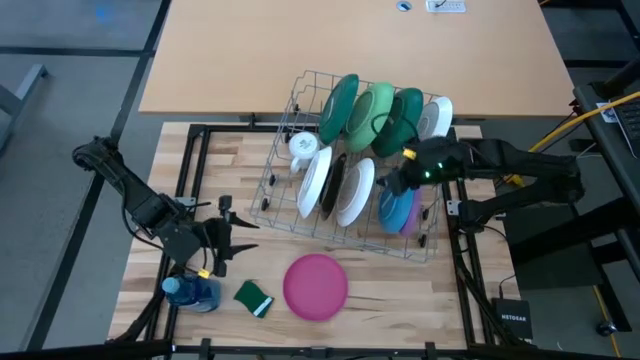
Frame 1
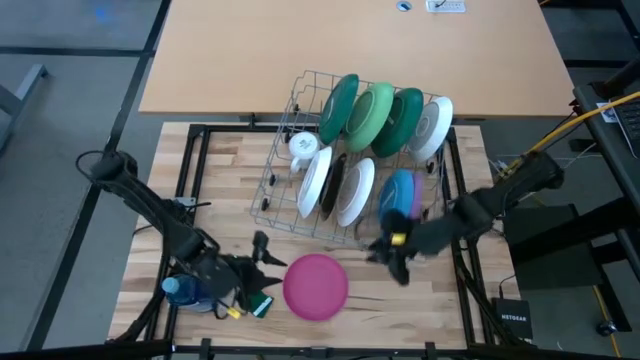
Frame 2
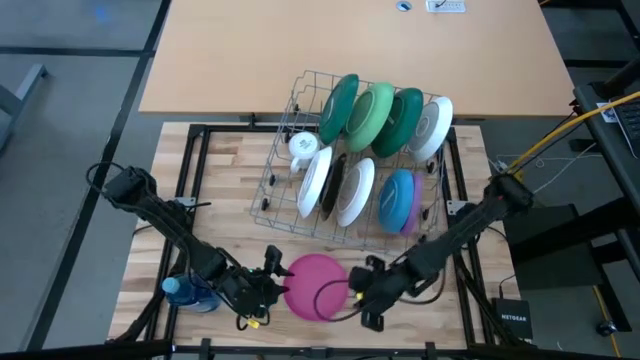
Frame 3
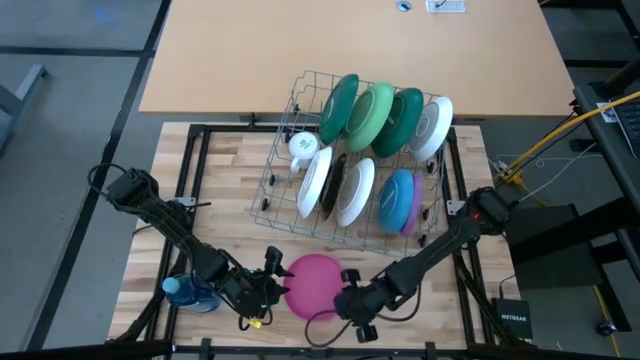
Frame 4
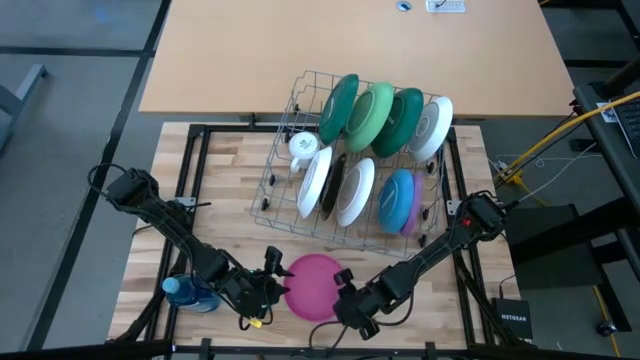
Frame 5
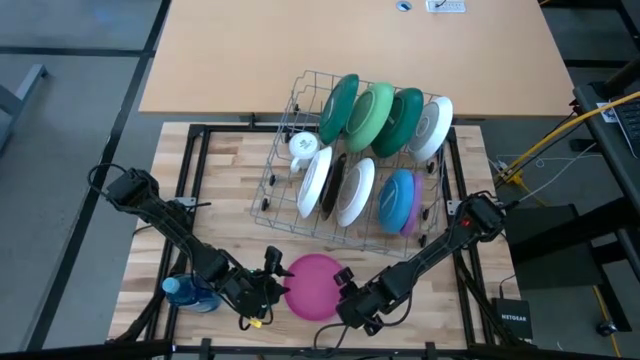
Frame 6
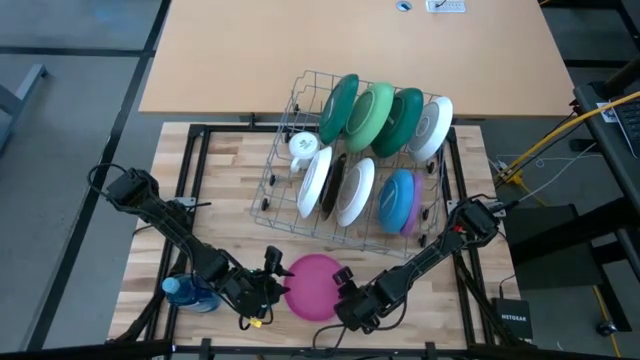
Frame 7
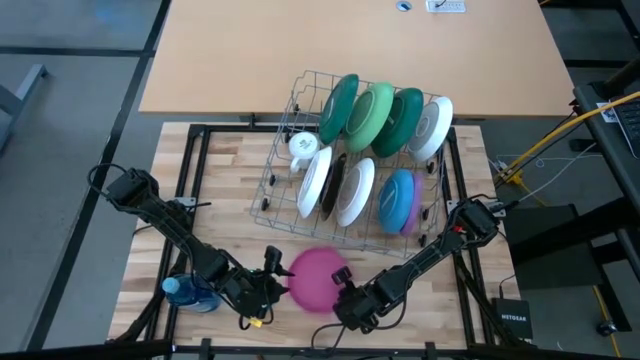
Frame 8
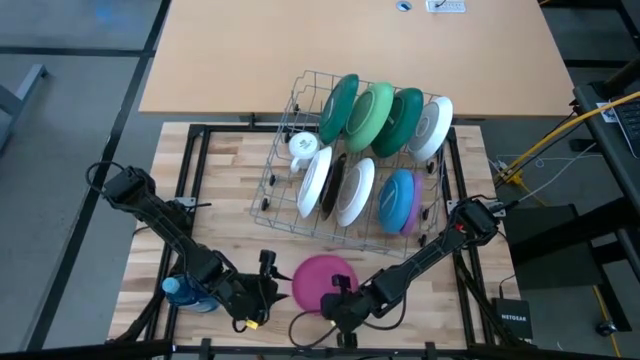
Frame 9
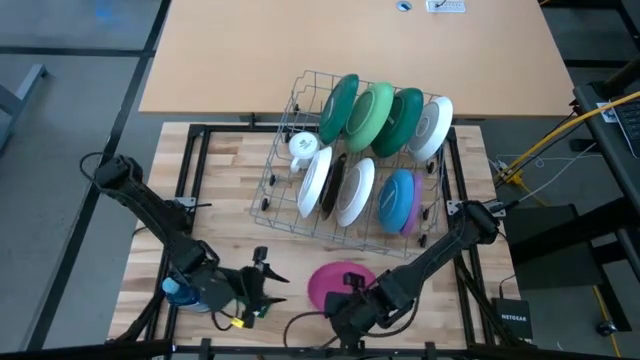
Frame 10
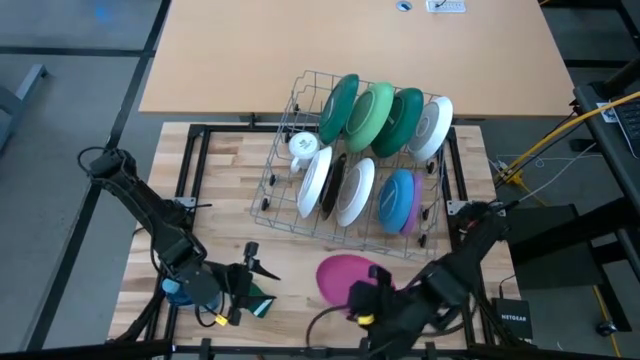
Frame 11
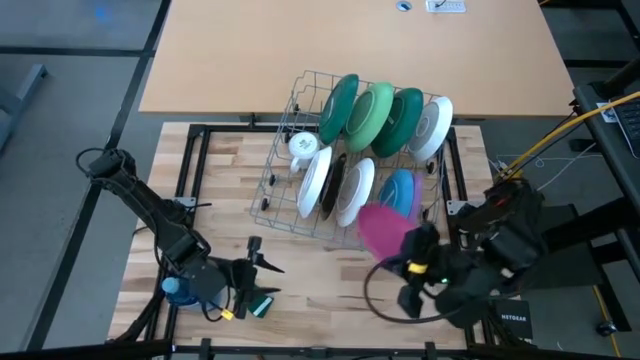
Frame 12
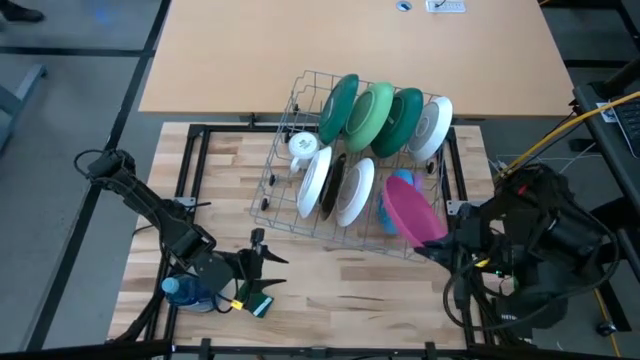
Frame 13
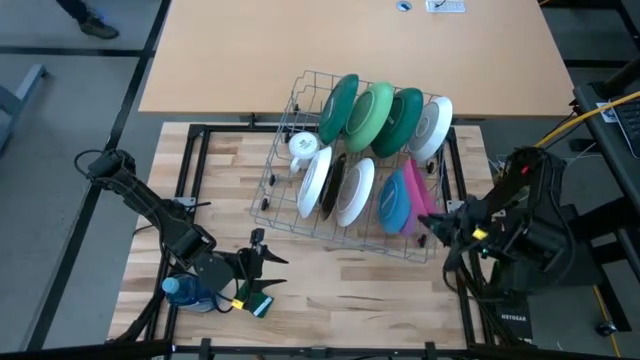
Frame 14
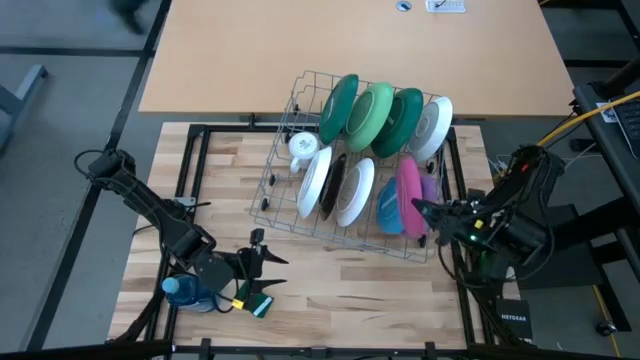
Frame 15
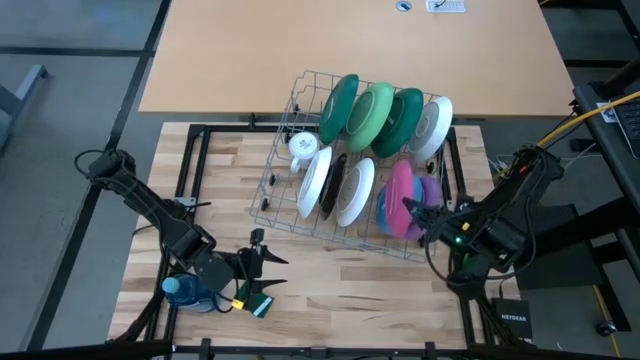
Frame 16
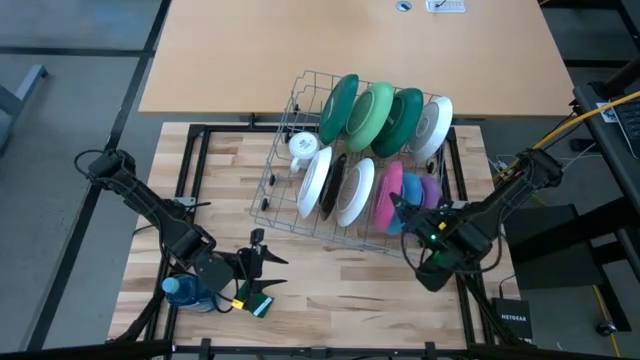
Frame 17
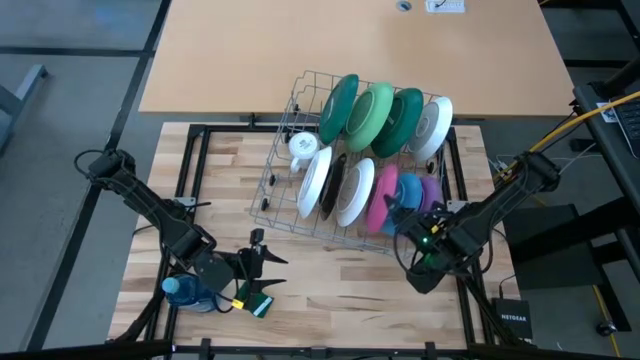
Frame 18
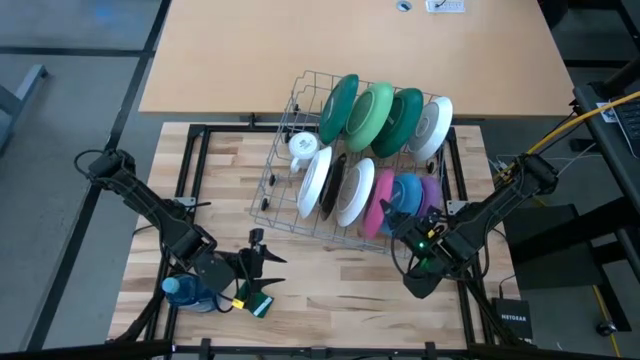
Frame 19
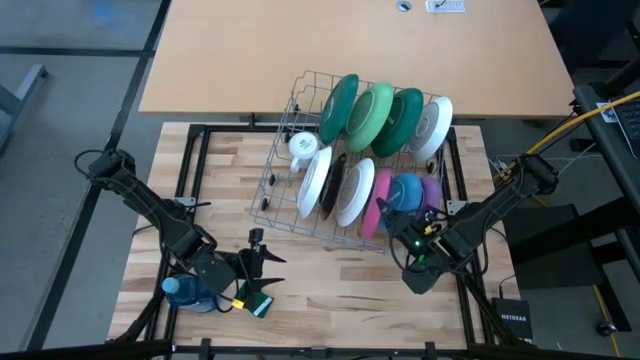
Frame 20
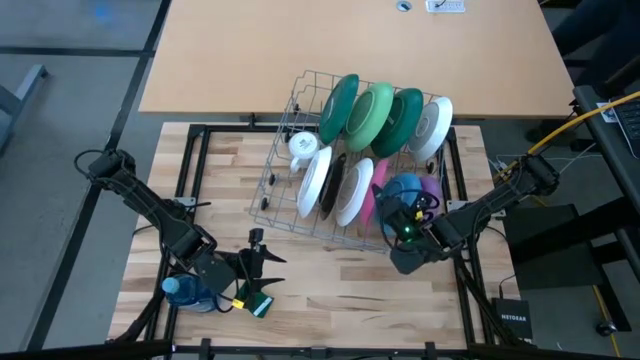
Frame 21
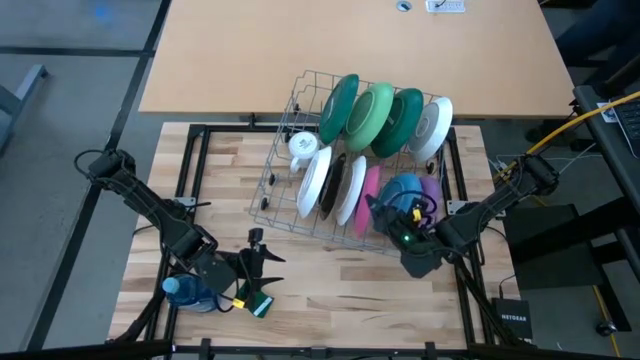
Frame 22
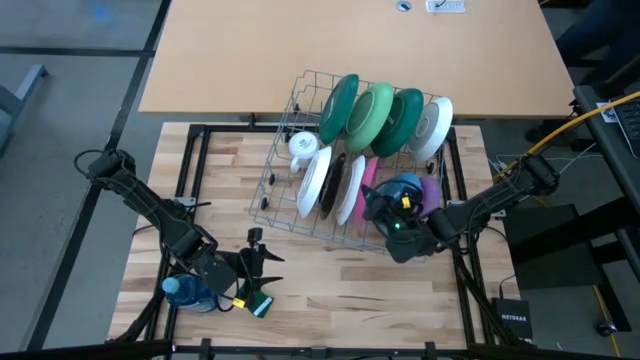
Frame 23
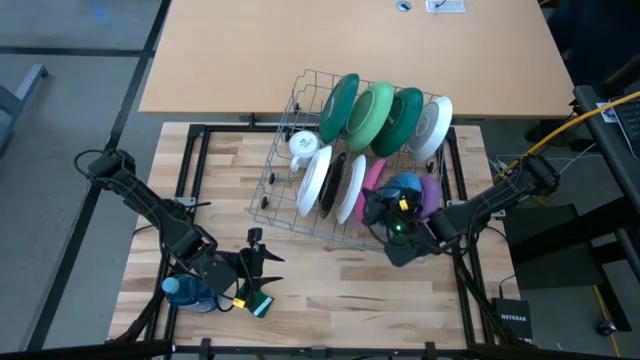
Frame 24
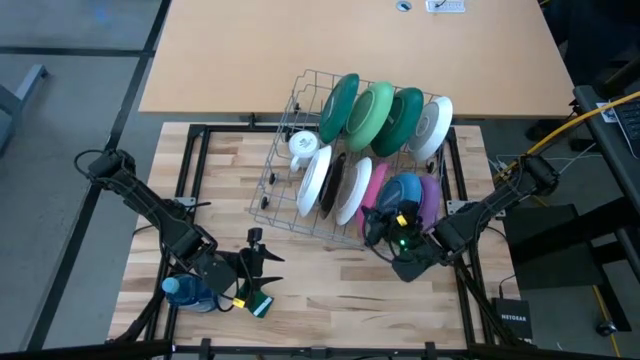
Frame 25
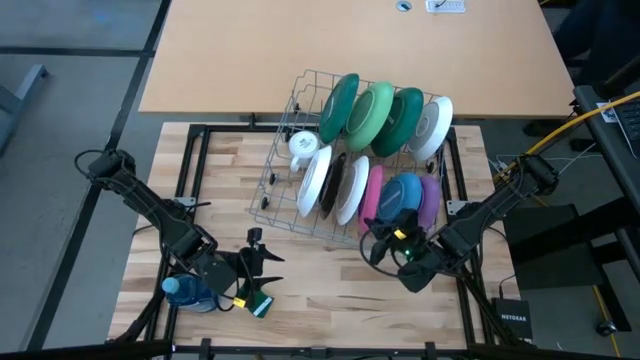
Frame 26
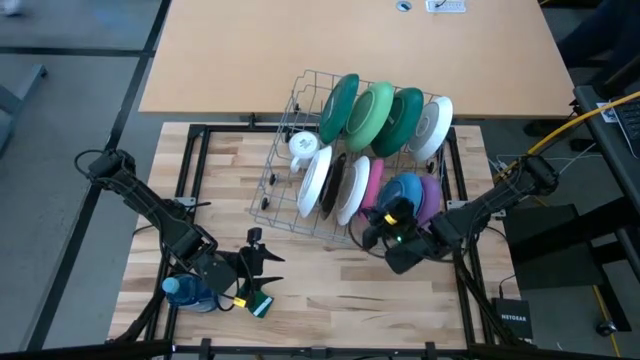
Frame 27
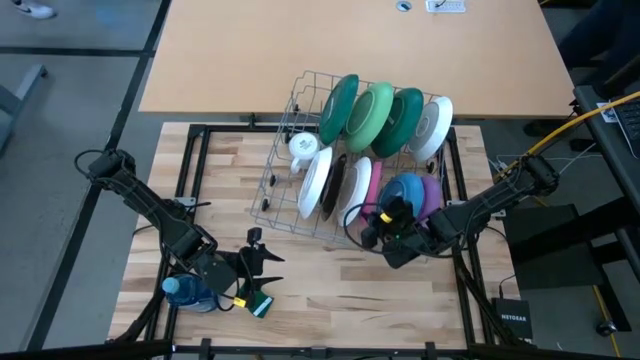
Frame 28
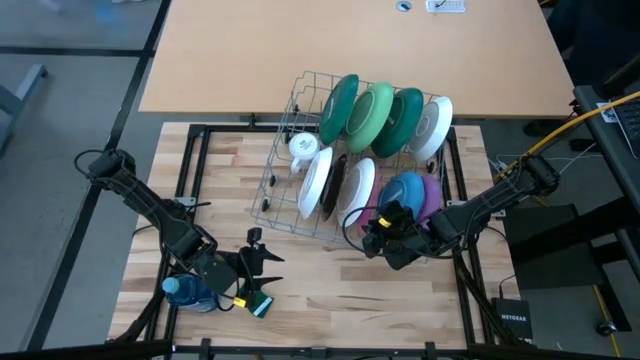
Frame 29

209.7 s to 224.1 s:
Task: Sort dishes
Put the pink plate in the dish rack

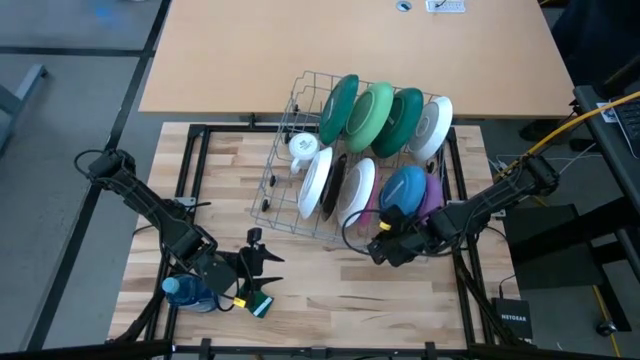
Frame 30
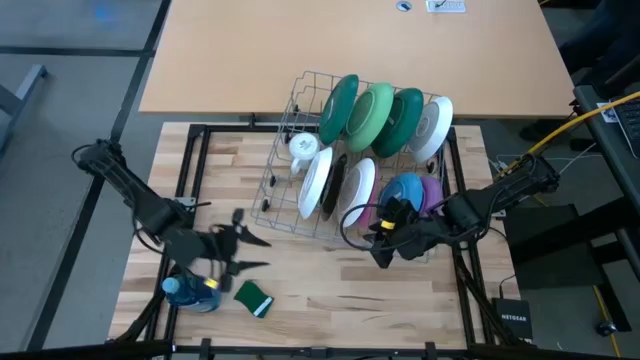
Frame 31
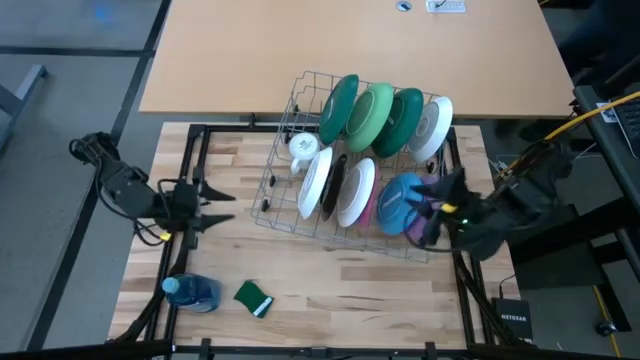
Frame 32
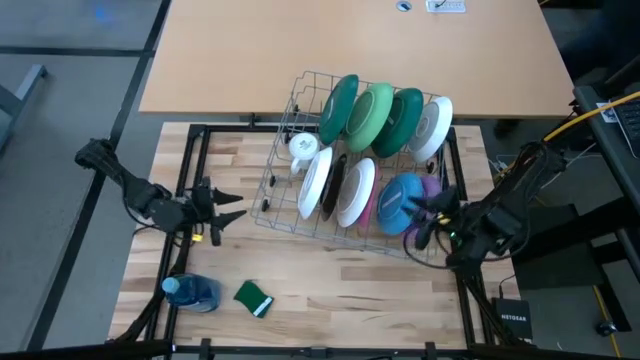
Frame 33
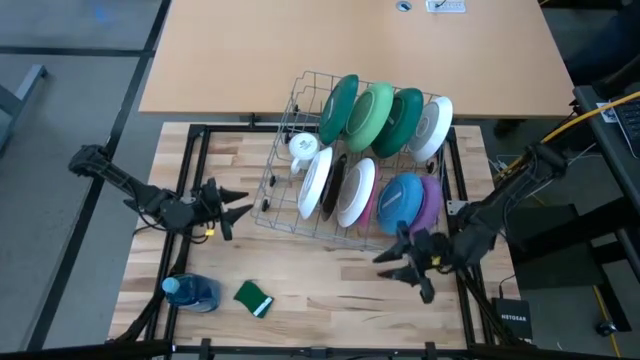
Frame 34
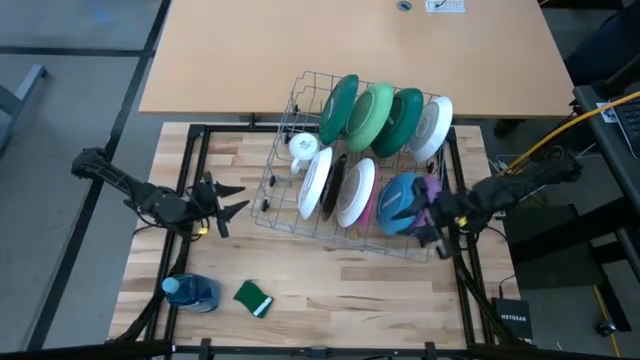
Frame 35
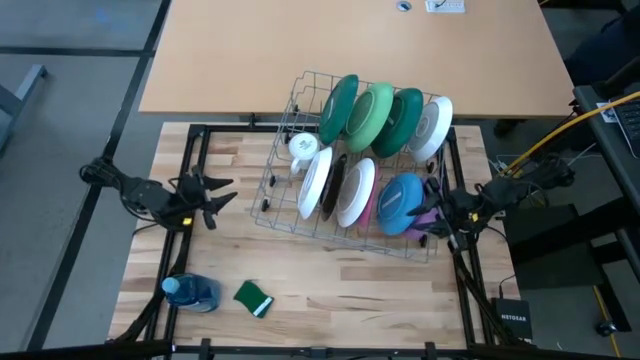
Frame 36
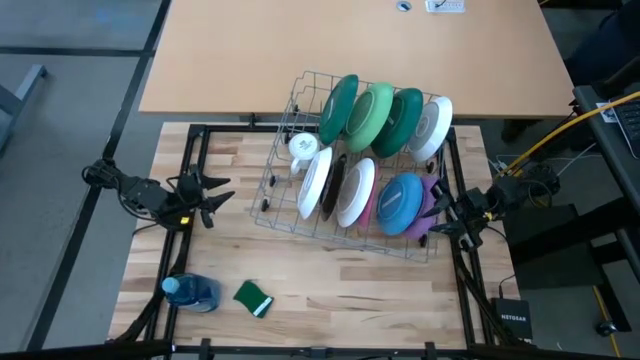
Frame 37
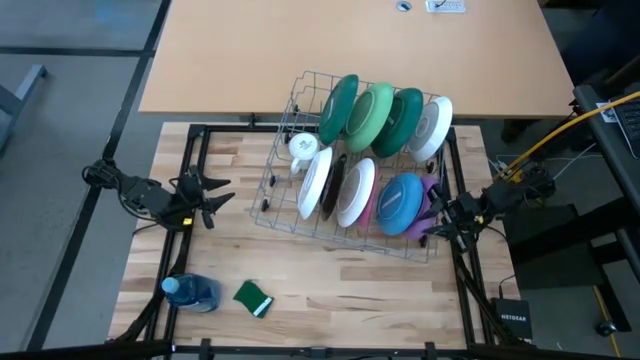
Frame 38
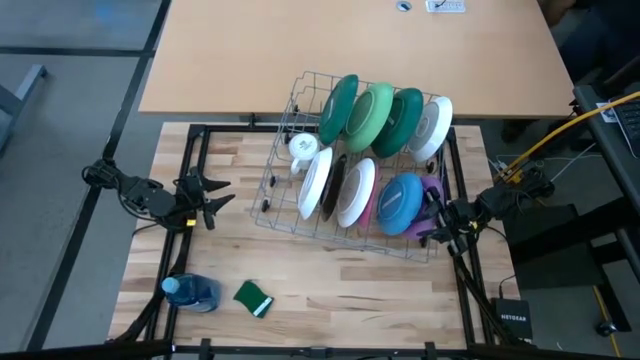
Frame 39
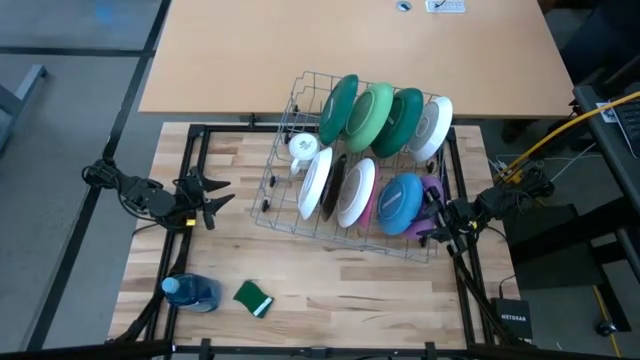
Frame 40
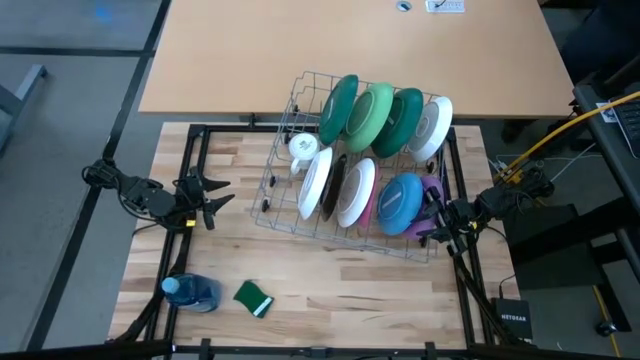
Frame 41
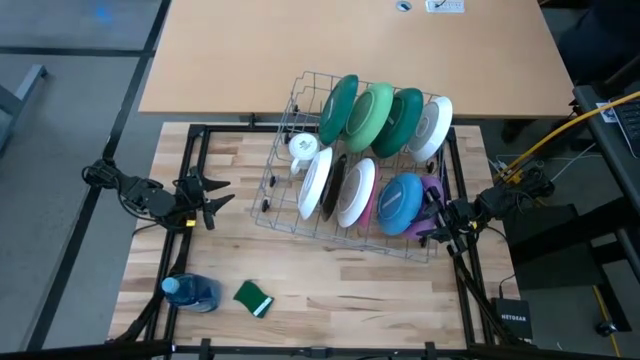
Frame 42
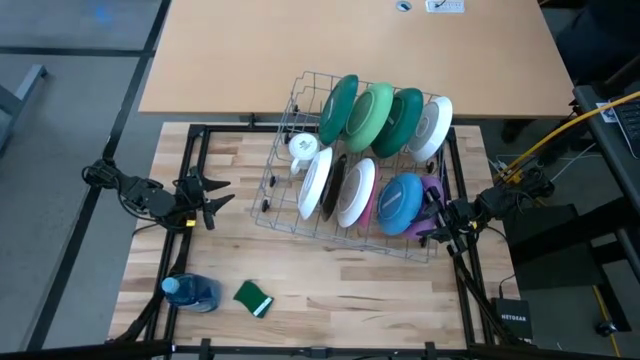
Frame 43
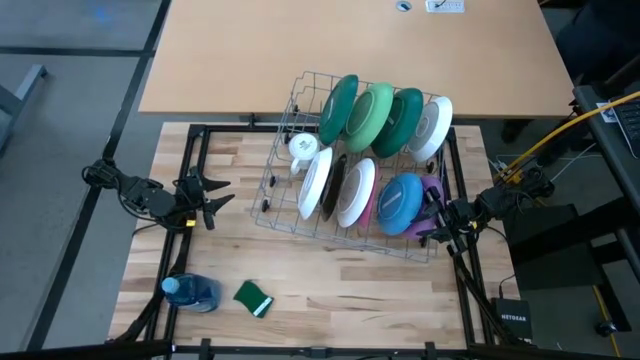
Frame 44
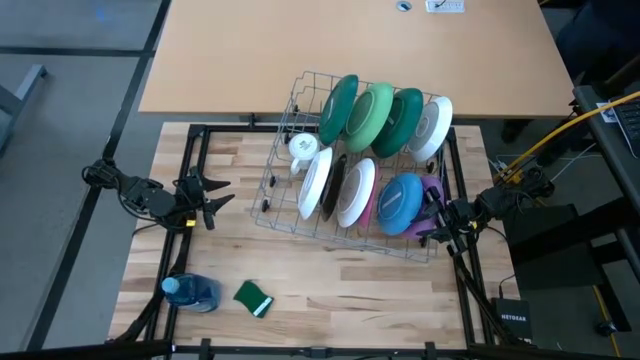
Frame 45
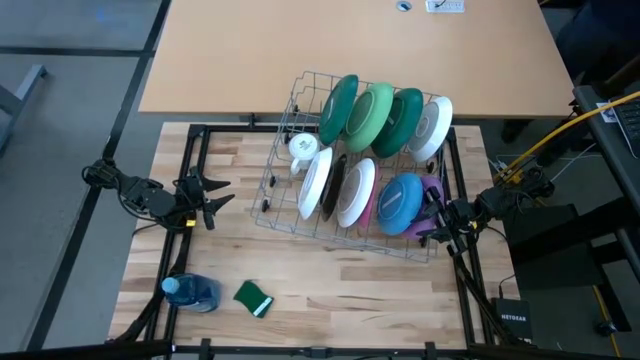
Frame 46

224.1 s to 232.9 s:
Return to Home Position
